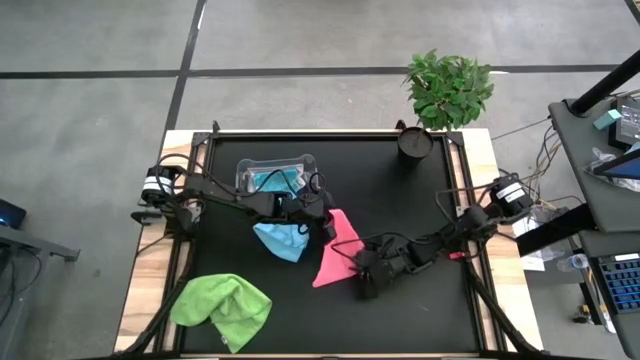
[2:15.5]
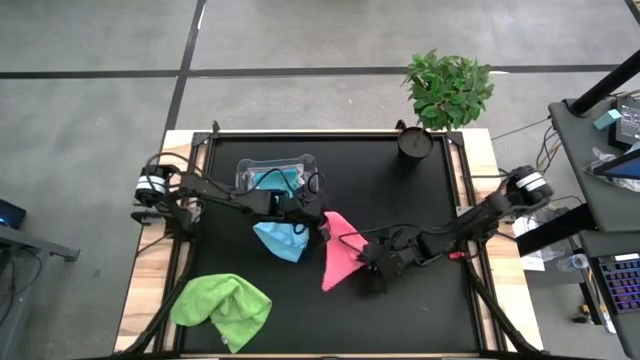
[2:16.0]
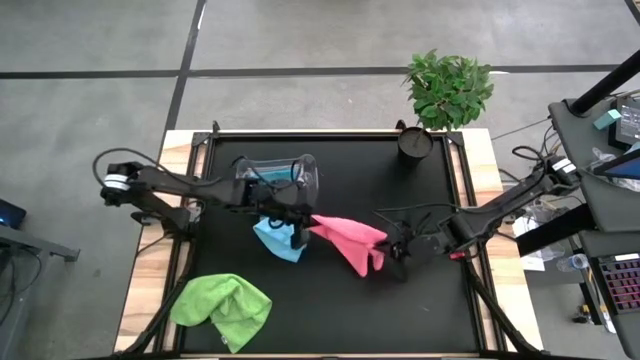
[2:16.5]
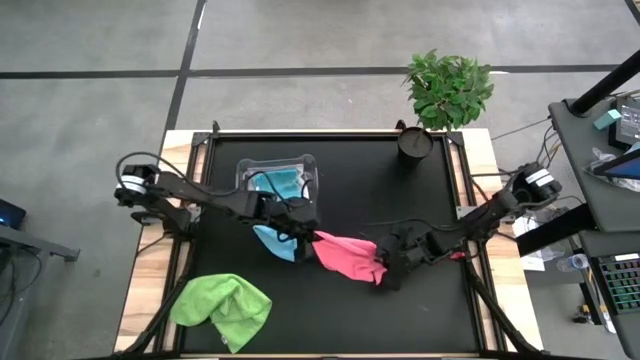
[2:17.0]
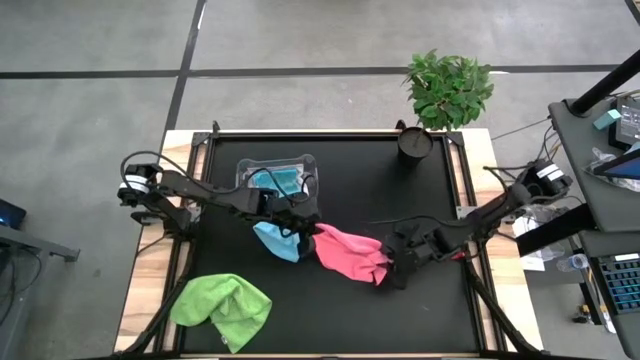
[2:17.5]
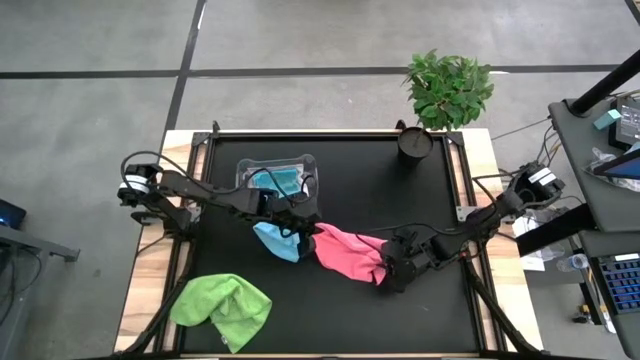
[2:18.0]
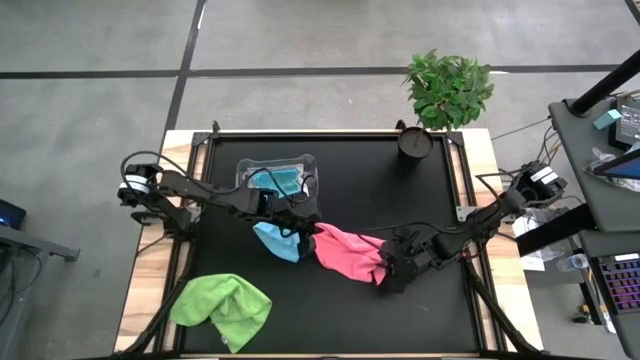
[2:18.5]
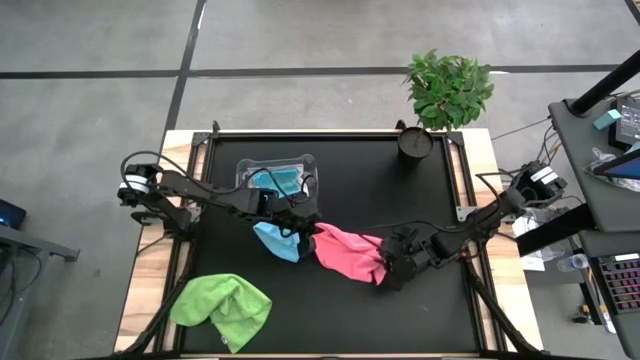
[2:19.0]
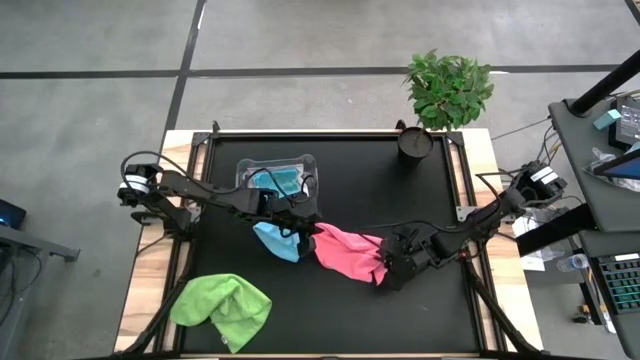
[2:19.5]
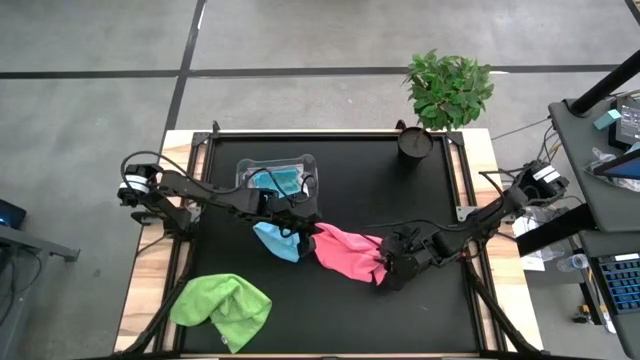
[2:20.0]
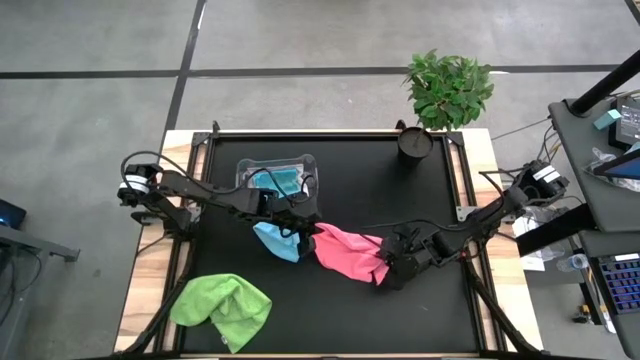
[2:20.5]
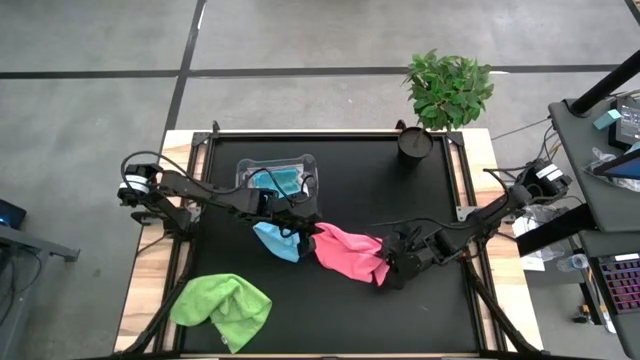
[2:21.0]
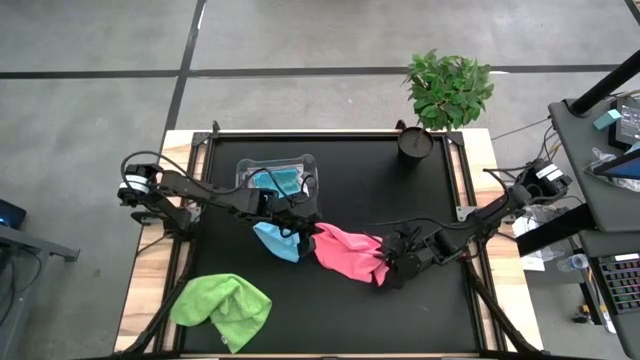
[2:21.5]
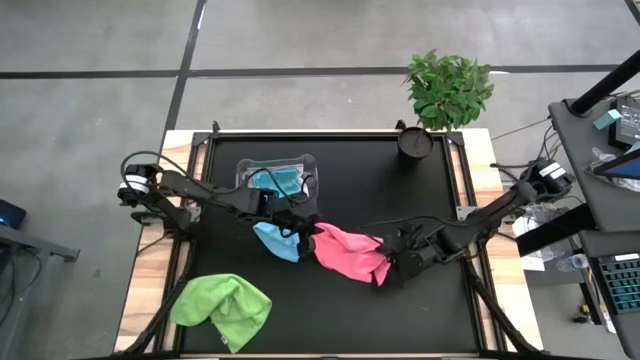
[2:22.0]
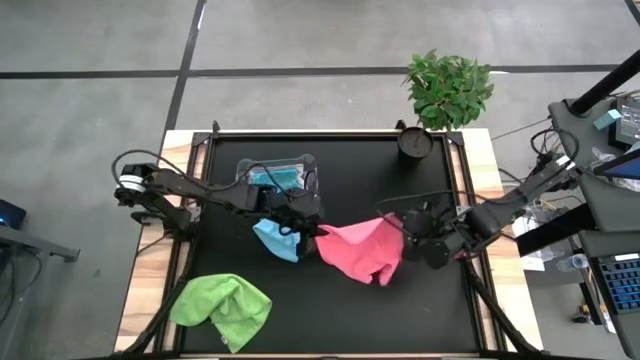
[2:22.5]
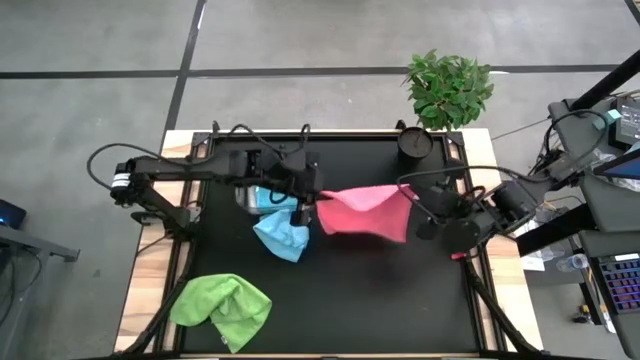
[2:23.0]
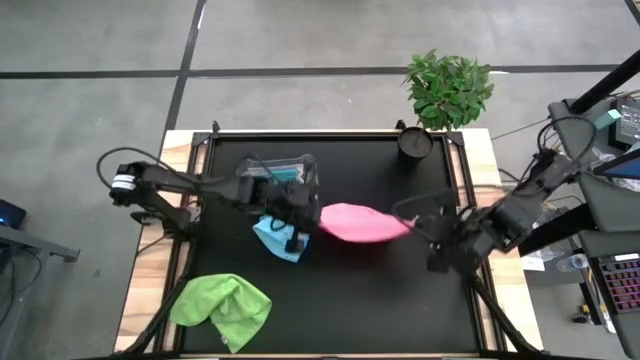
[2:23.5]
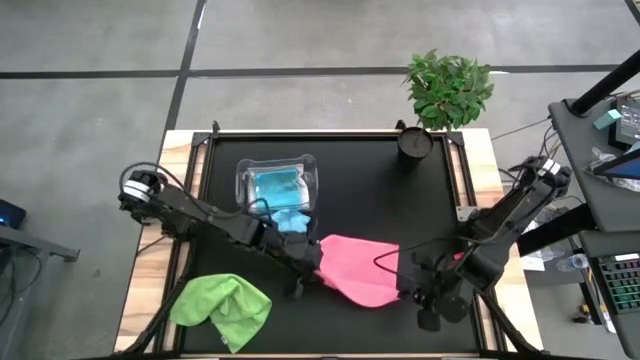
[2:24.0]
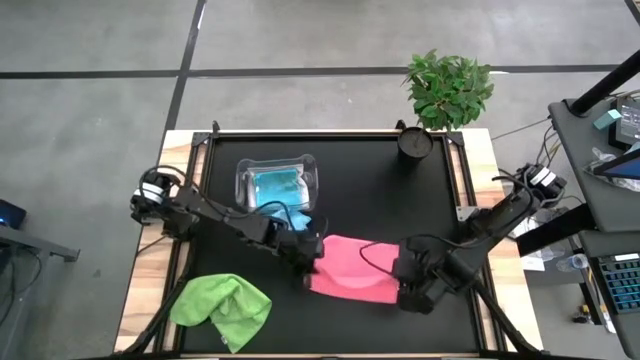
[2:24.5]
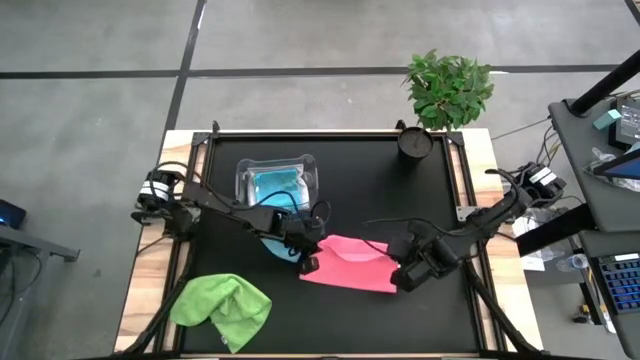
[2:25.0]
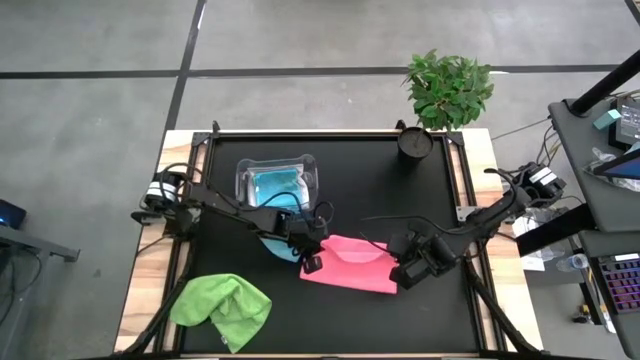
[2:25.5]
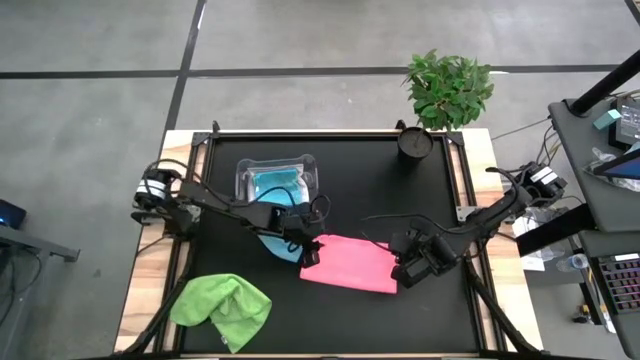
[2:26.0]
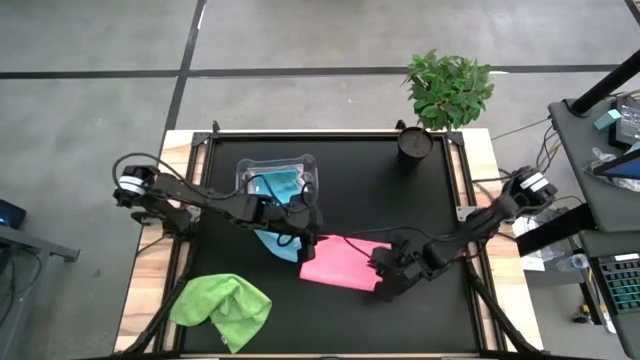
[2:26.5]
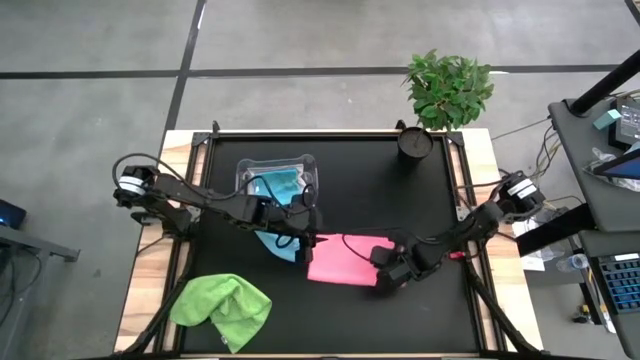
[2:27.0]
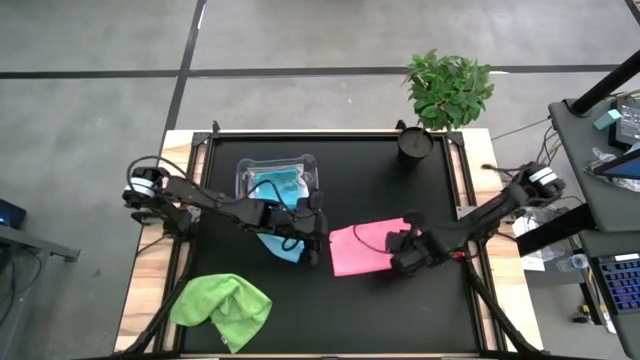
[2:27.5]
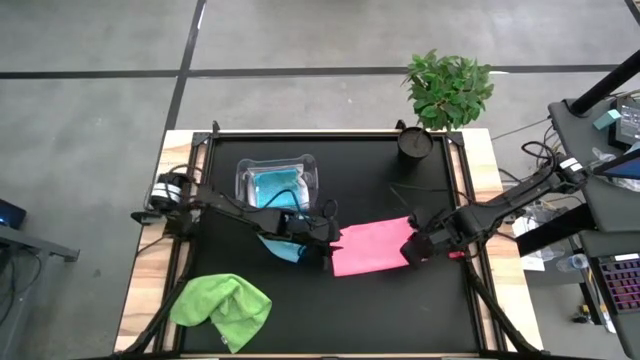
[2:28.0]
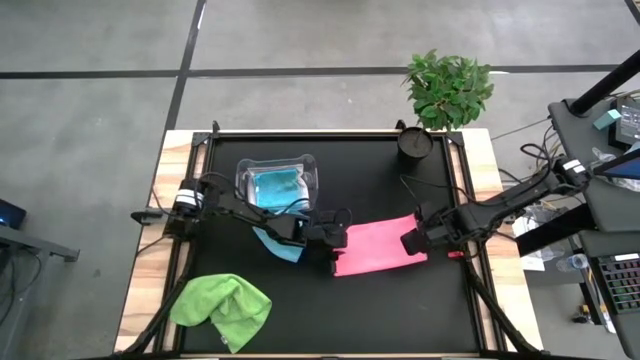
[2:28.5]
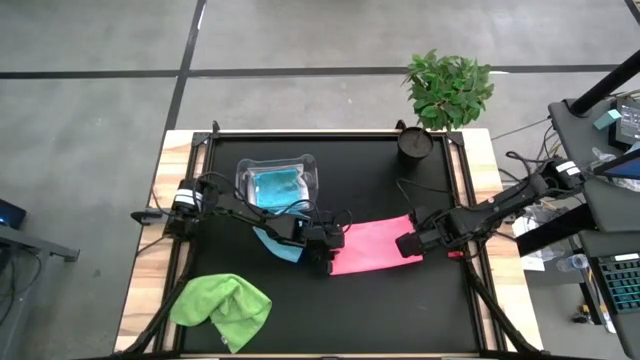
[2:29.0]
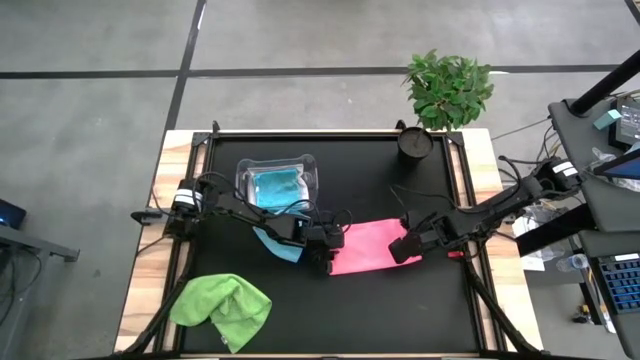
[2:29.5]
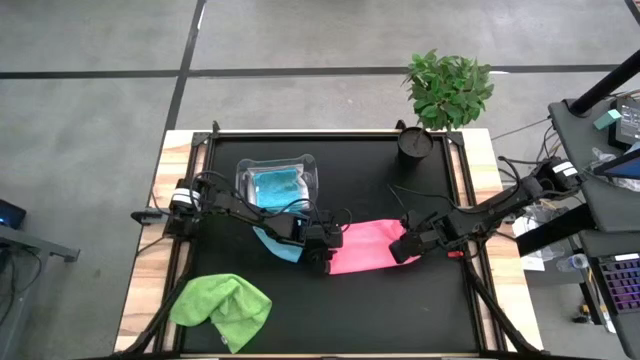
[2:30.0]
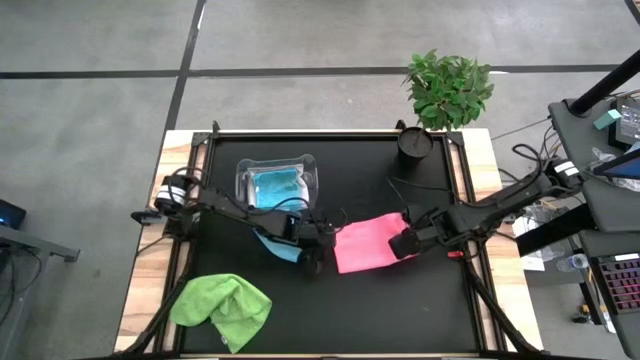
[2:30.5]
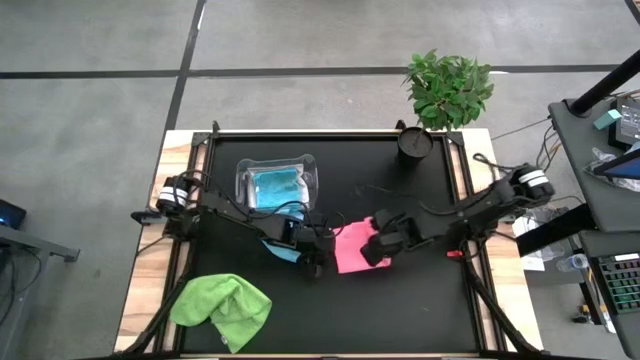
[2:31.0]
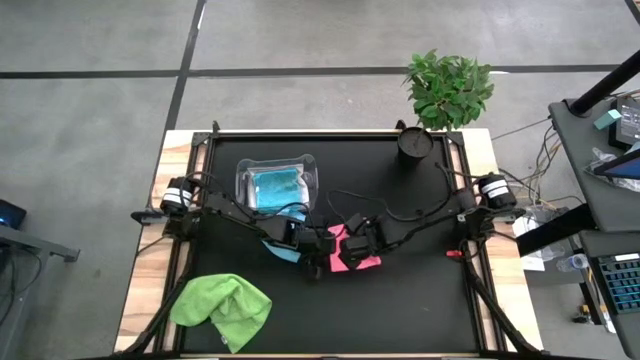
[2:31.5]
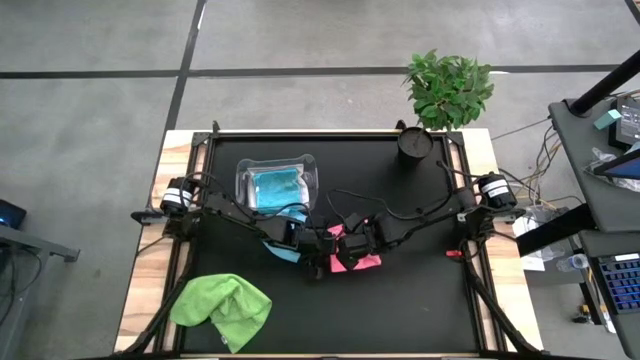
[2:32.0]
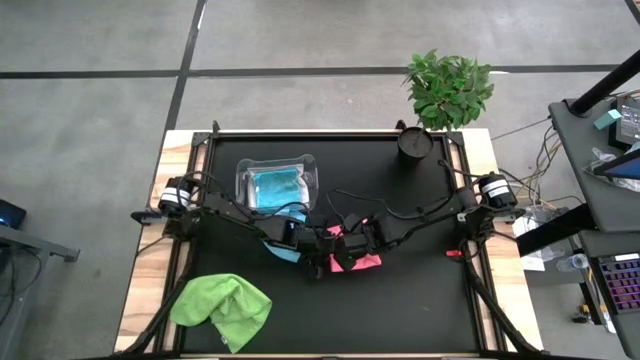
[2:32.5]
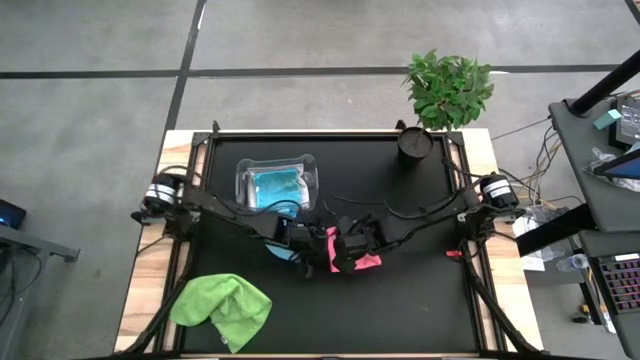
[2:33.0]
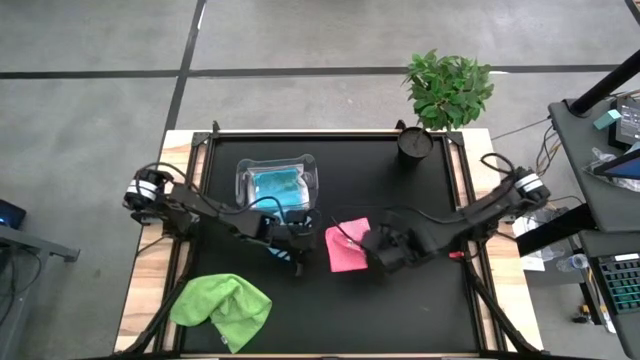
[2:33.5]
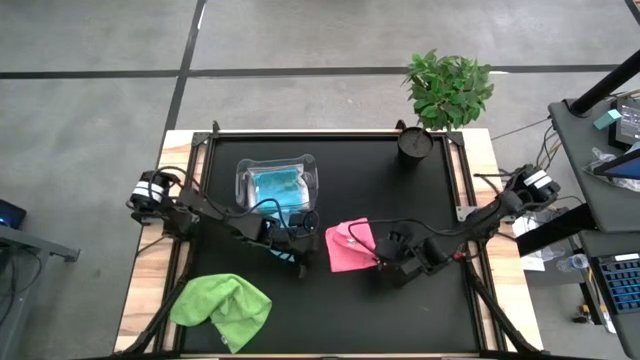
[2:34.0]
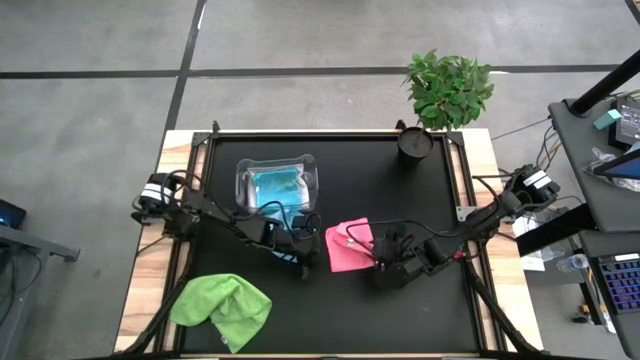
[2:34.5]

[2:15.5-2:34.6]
Task: Fold microfiber towels
Fold the pink microfiber cloth

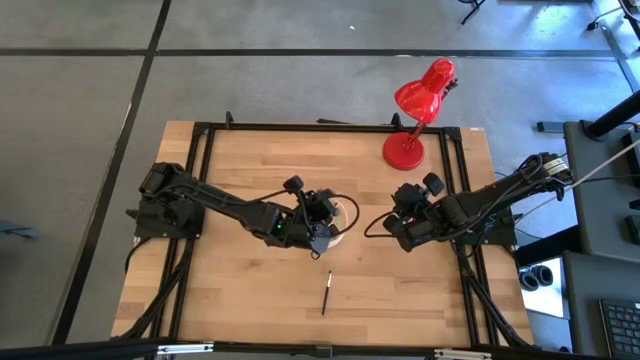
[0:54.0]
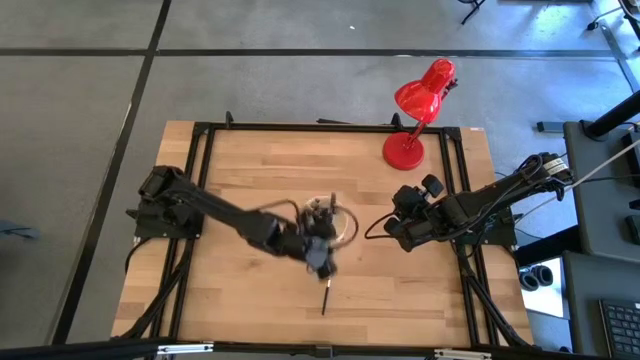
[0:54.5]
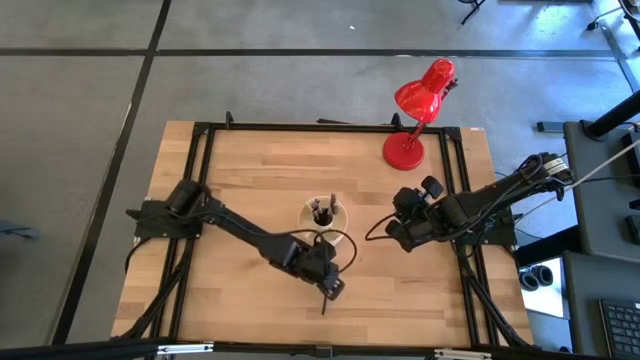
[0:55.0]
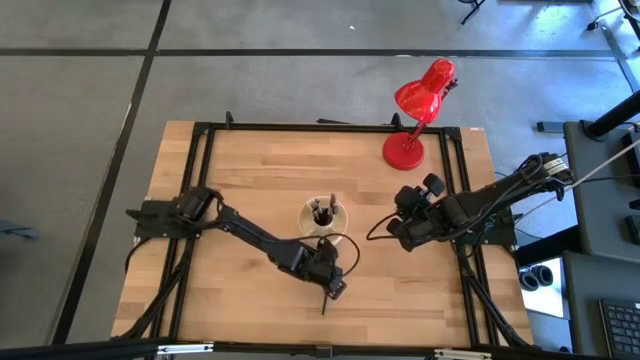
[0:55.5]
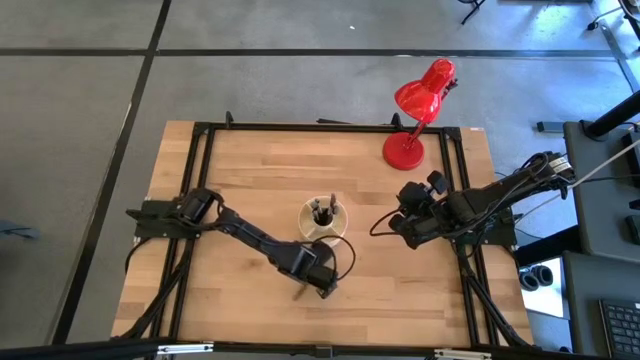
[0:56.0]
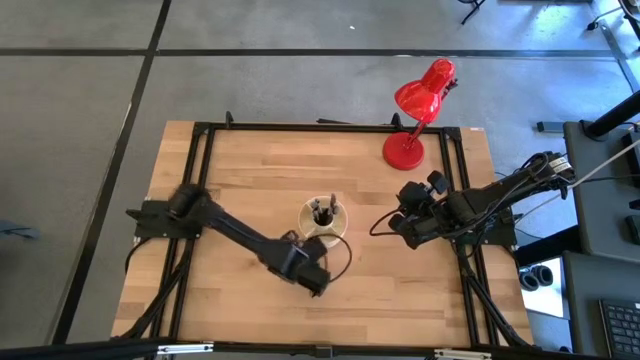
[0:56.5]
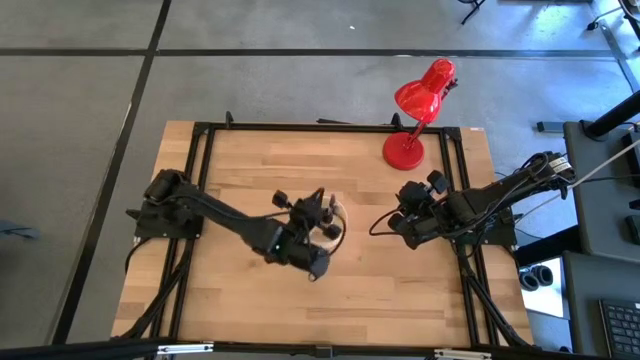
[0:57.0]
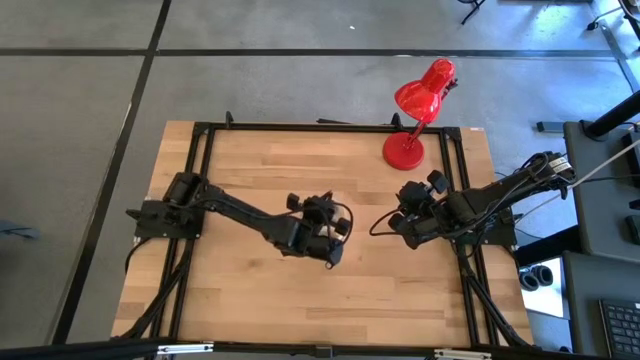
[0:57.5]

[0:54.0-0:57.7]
Task: Put items in baskets/containers
Put the black eyeshadow brush into the white brush holder
